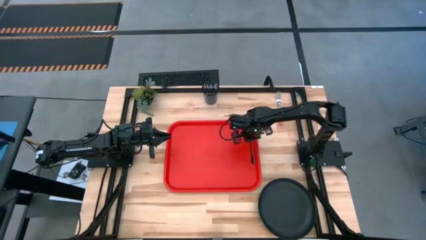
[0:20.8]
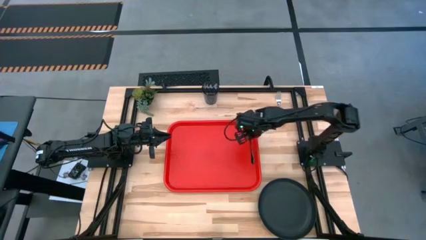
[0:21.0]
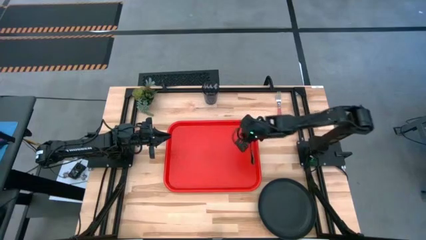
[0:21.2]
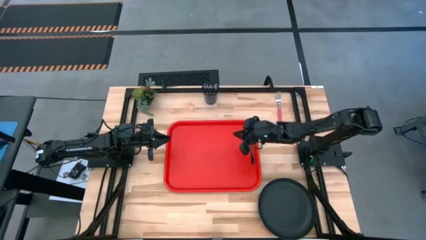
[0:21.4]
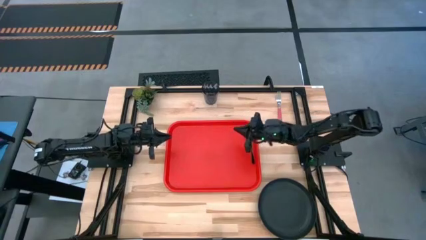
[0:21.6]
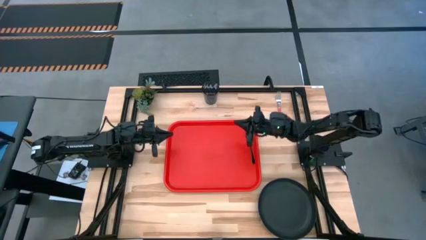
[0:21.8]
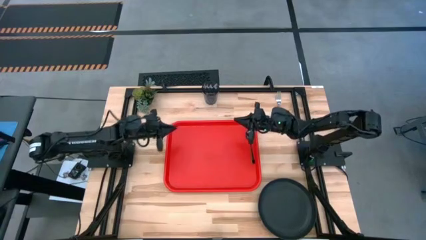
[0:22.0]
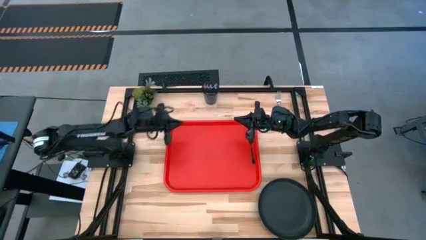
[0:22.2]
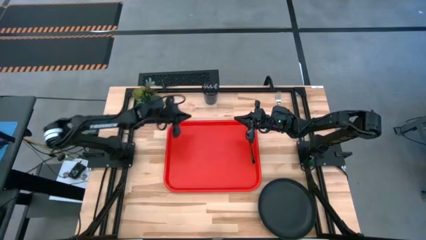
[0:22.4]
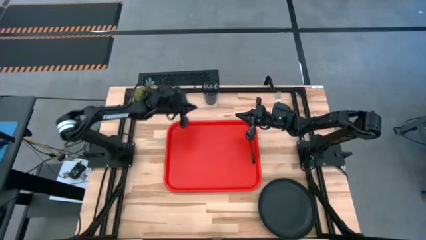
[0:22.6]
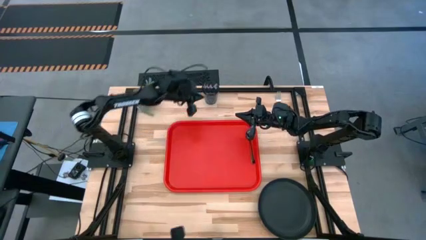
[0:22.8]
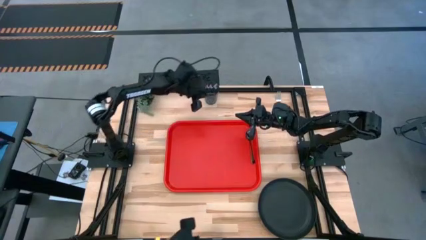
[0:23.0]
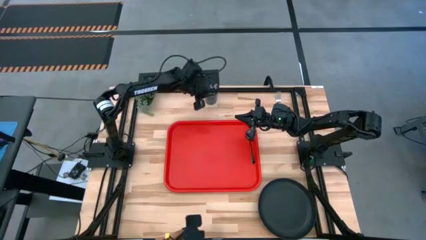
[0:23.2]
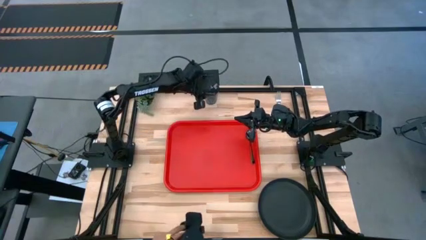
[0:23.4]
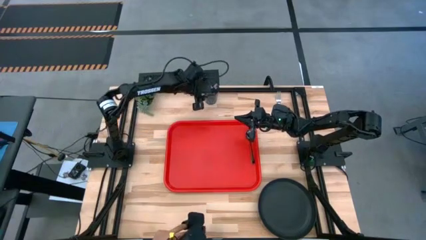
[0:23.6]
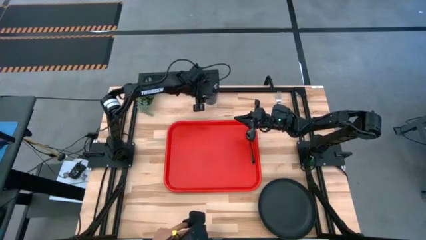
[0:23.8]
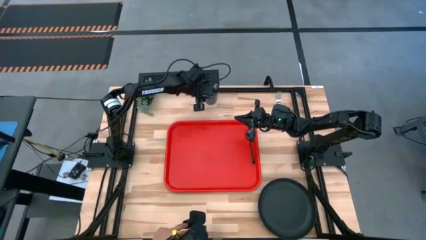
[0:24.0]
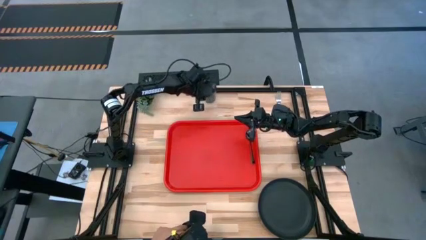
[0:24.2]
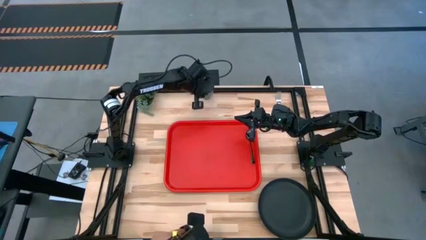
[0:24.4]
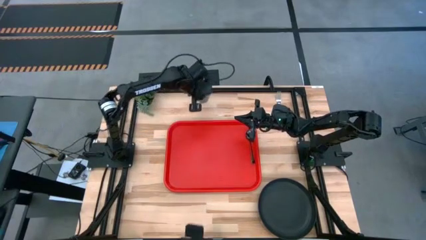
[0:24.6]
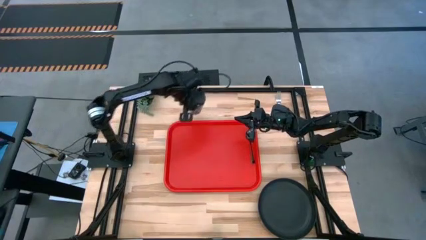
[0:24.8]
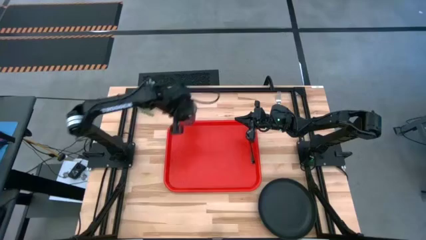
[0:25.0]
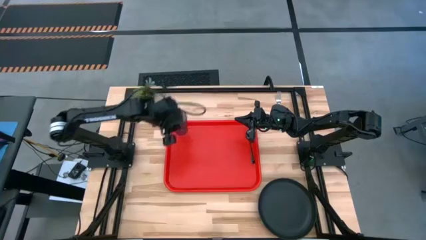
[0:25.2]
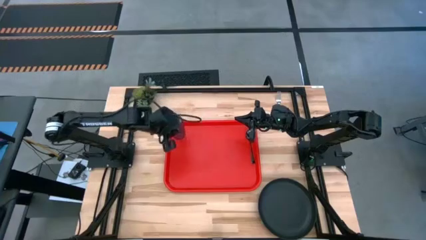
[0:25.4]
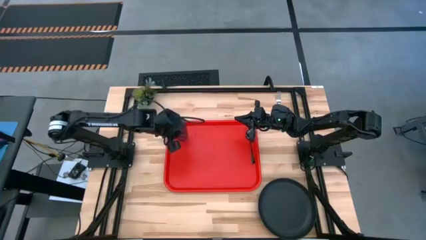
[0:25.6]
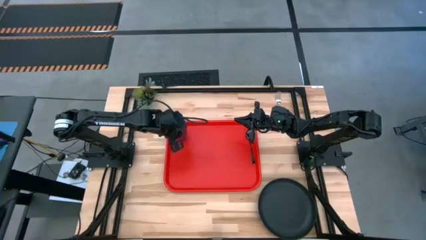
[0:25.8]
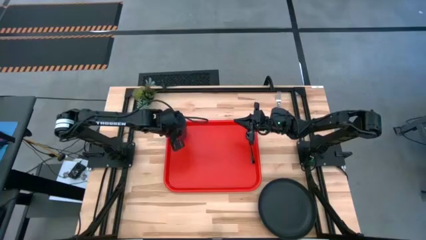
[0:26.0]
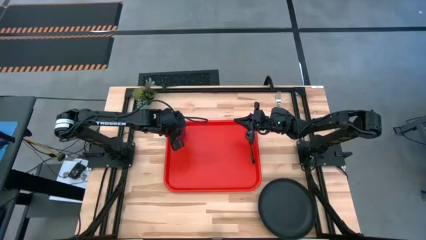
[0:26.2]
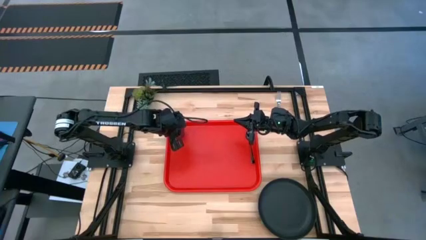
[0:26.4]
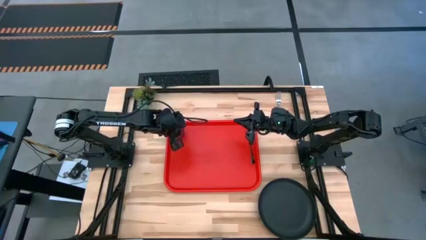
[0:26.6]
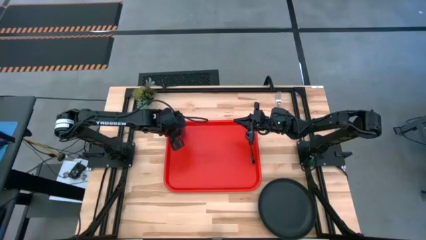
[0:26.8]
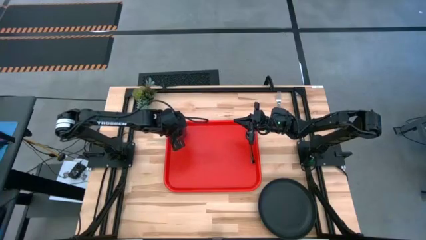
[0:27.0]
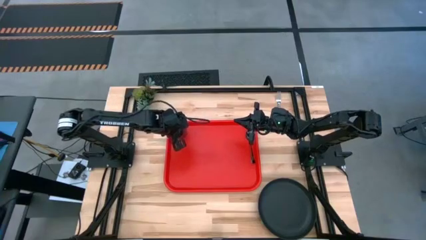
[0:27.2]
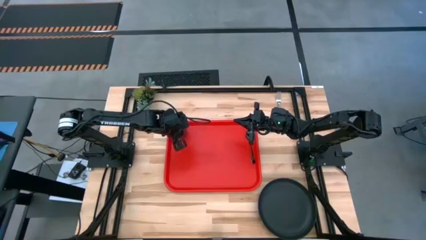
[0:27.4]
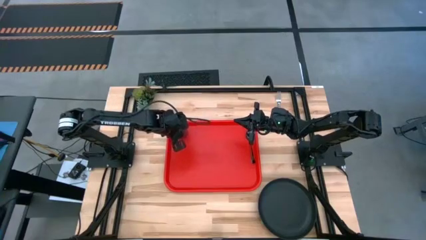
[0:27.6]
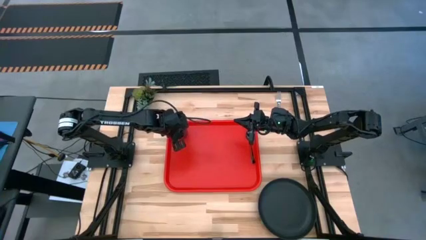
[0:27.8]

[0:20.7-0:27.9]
Task: Pick and place plate/cup/fork/spoon on tray
Put the blue glass on the top left of the red serving tray

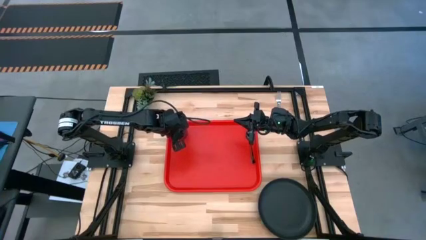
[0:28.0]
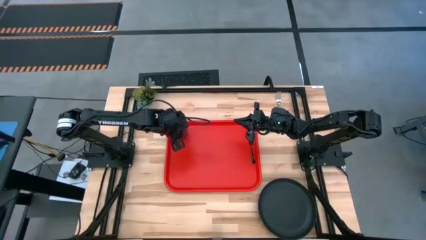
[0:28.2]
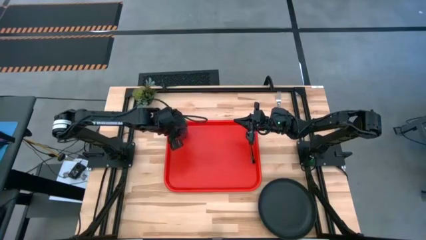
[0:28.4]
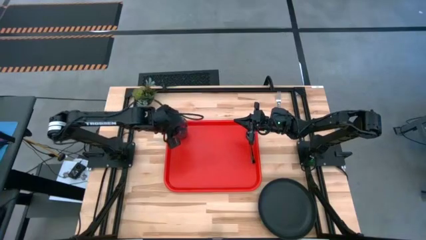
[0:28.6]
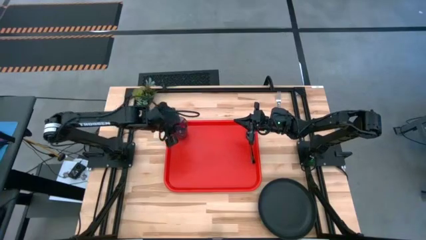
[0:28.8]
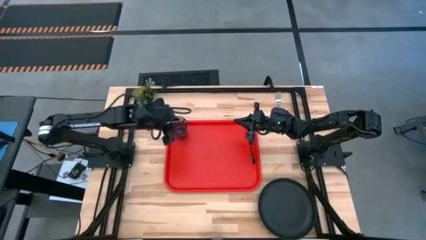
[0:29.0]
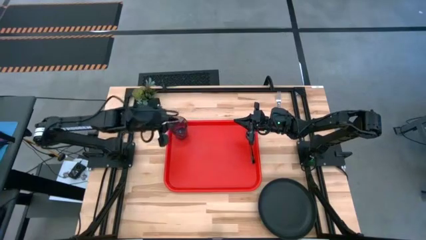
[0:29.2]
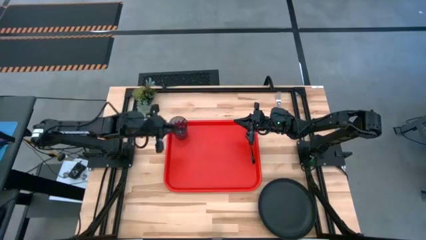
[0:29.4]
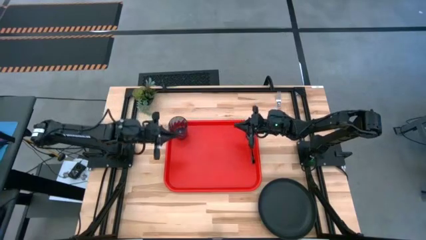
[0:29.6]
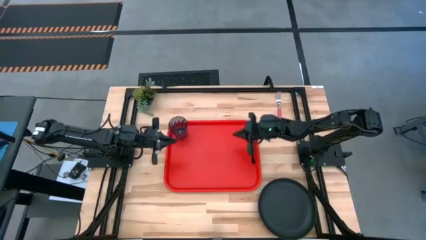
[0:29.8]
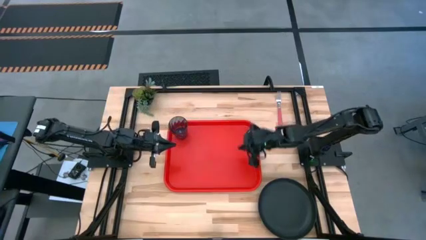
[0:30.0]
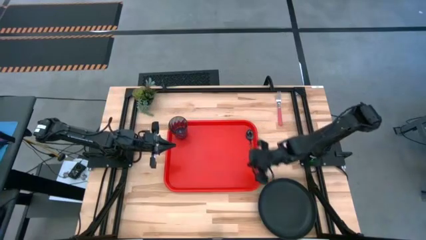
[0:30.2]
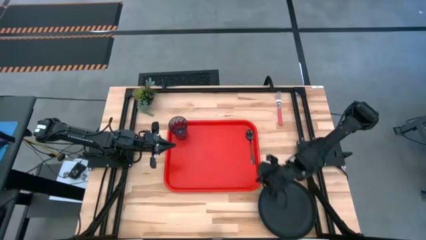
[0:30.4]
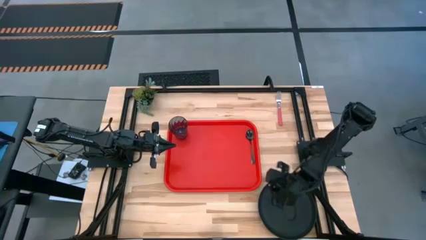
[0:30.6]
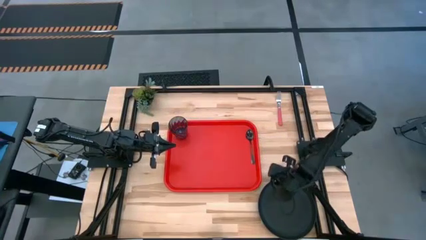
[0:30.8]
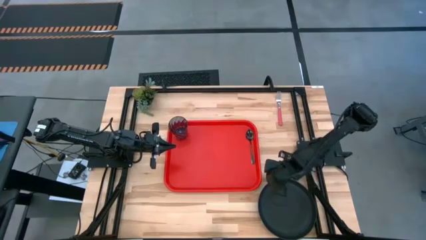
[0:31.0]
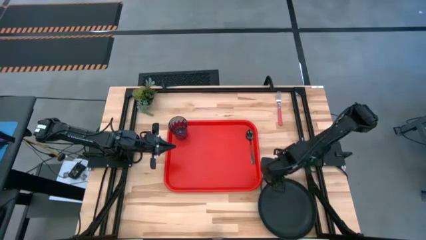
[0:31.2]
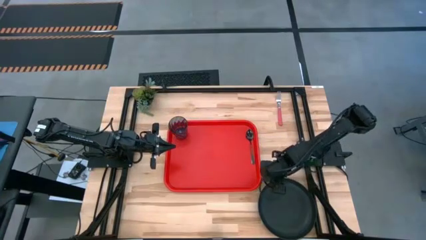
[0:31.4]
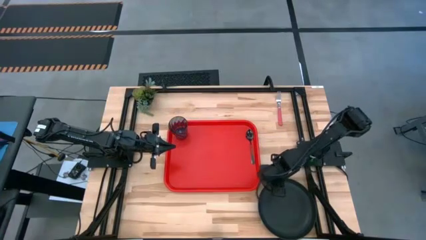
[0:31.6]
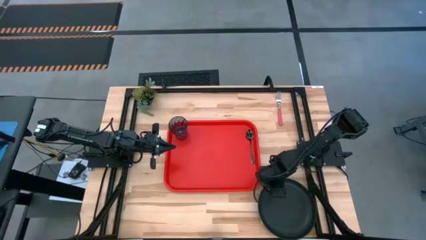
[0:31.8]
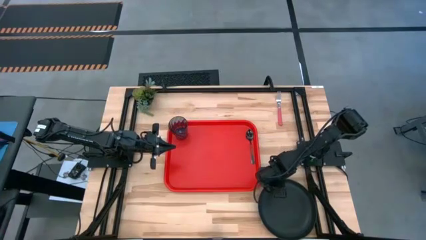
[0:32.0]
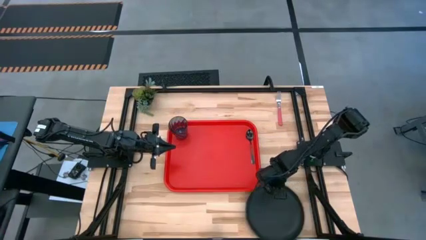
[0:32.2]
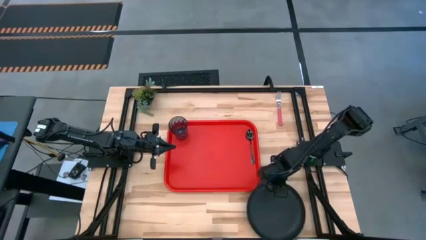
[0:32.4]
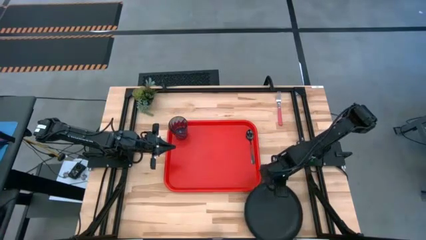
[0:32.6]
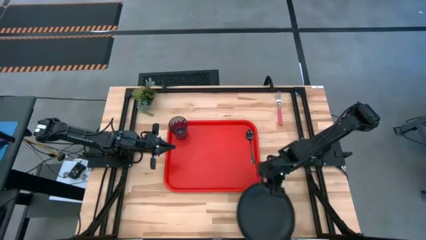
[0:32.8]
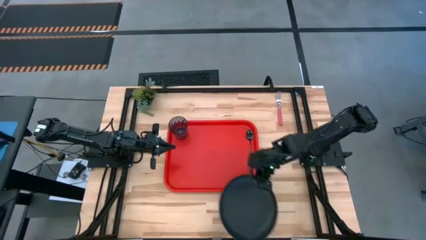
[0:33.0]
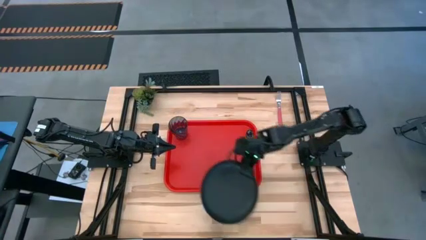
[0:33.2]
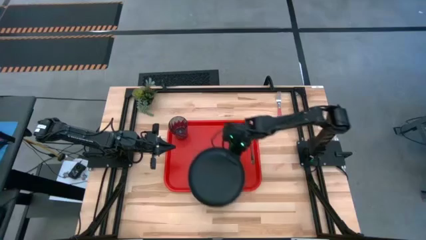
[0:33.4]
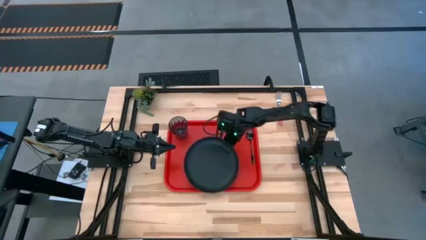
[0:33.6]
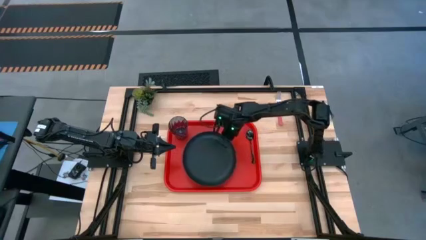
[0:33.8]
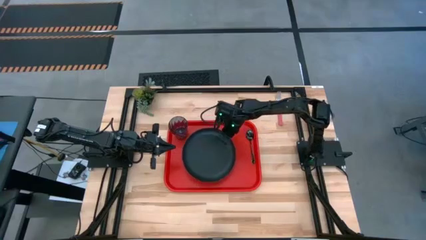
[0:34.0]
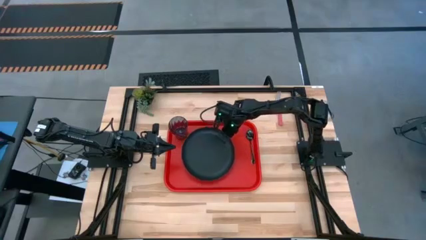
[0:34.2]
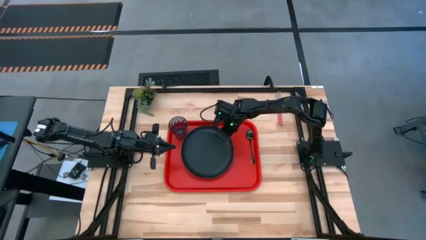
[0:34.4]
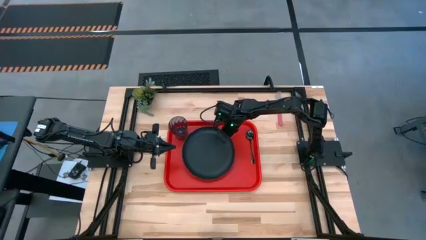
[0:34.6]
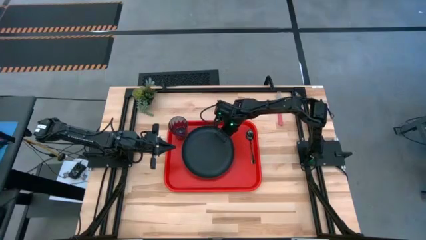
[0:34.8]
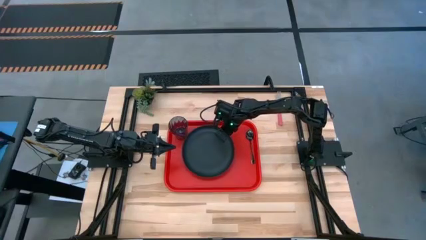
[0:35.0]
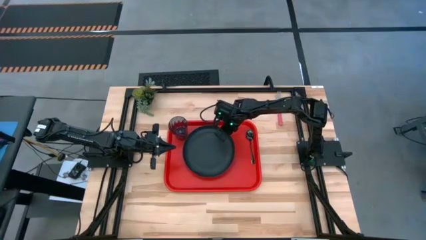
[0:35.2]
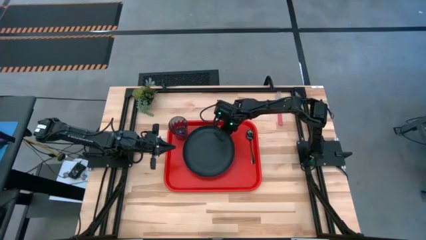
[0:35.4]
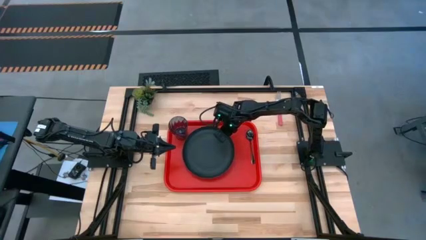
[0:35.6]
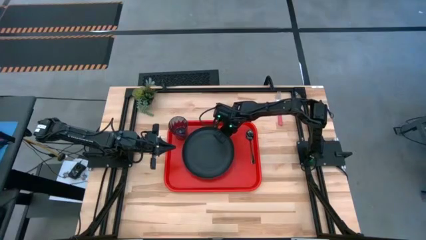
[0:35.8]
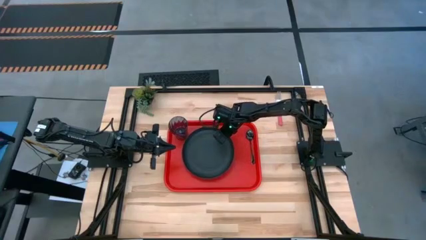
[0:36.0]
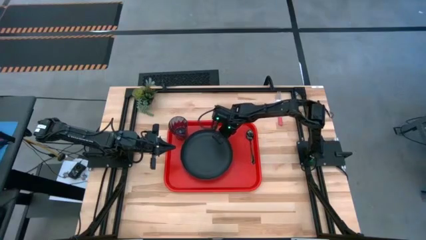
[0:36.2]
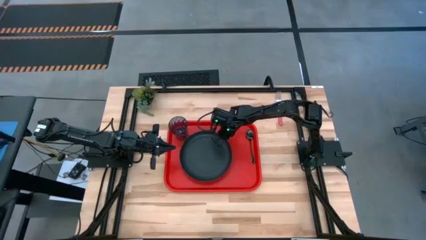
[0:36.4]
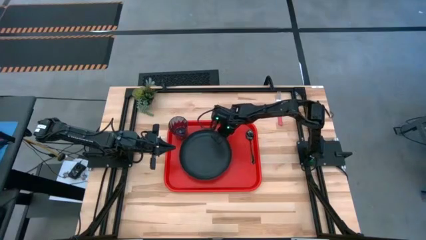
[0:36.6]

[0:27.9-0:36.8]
Put the black plate on the red serving tray to the bottom right of the blue glass

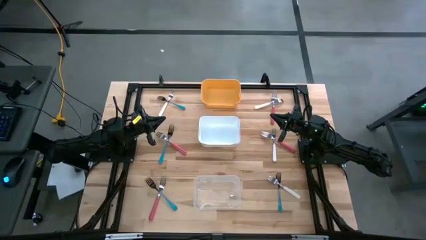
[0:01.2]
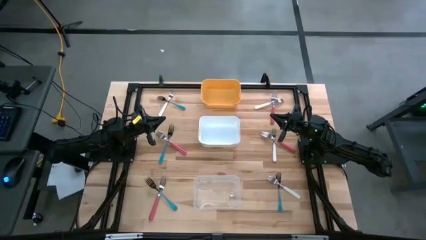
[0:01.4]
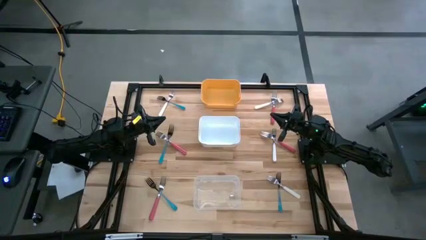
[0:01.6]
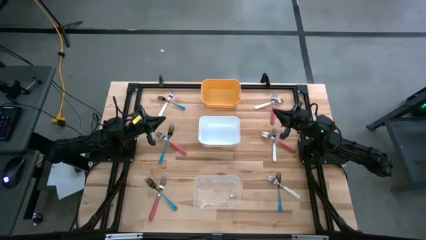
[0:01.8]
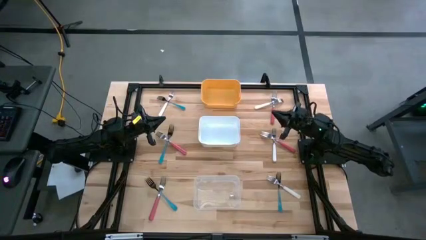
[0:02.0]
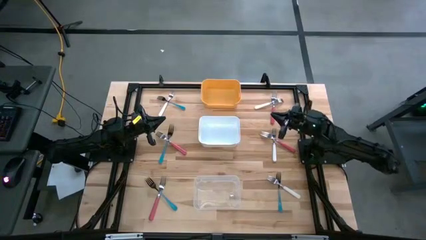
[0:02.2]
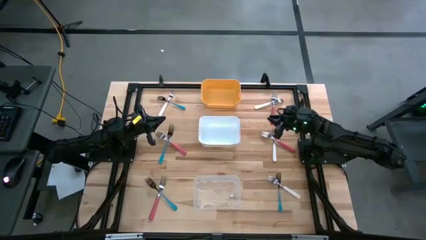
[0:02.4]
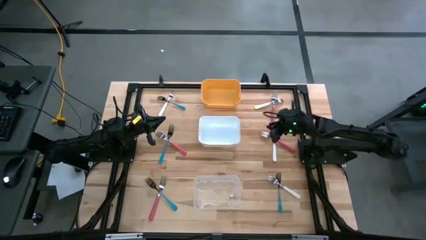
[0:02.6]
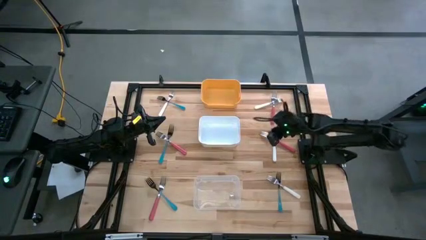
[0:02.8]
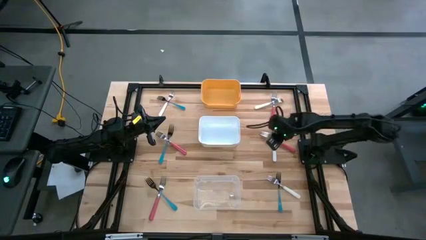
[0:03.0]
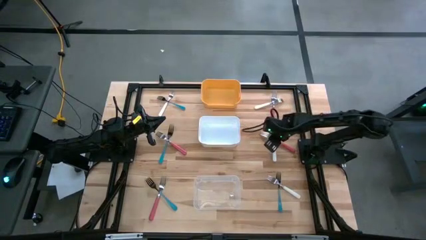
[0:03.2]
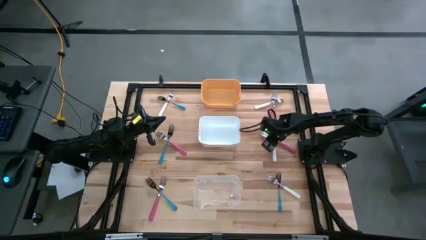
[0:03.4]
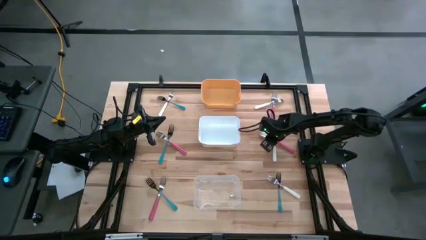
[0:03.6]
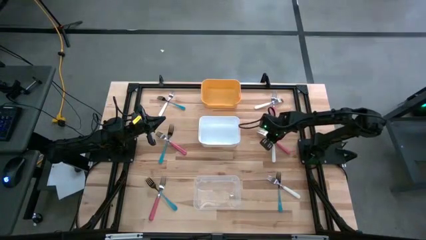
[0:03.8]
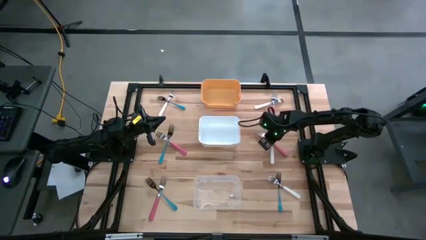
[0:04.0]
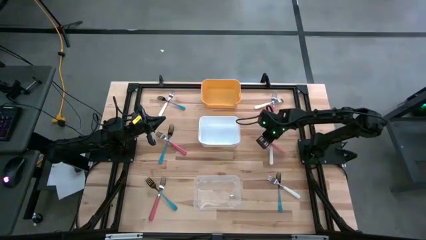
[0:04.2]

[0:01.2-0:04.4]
Task: Sort silverware by color (type)
Put the middle right pink fork into the white bin
